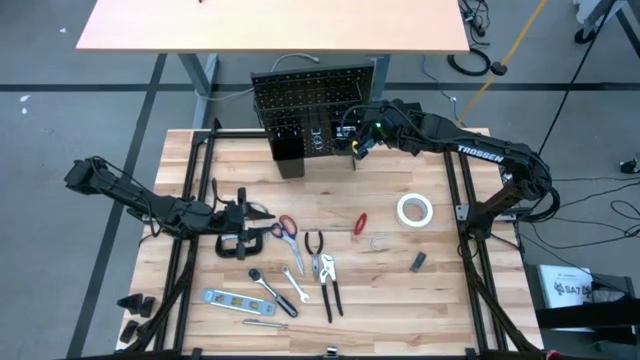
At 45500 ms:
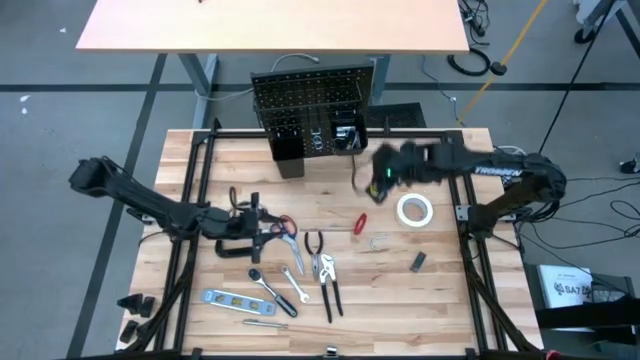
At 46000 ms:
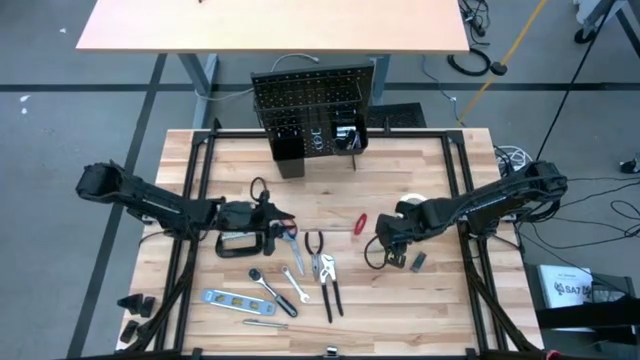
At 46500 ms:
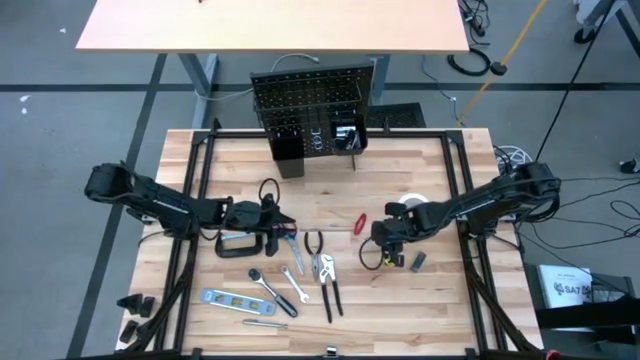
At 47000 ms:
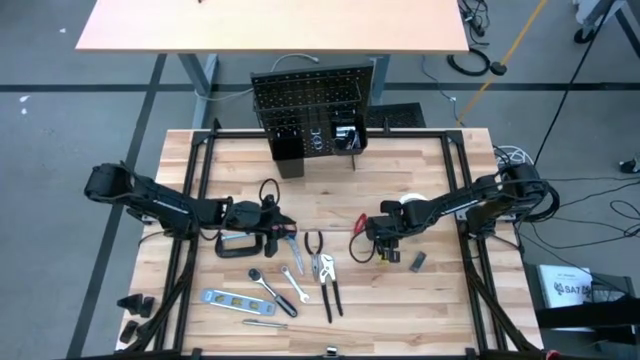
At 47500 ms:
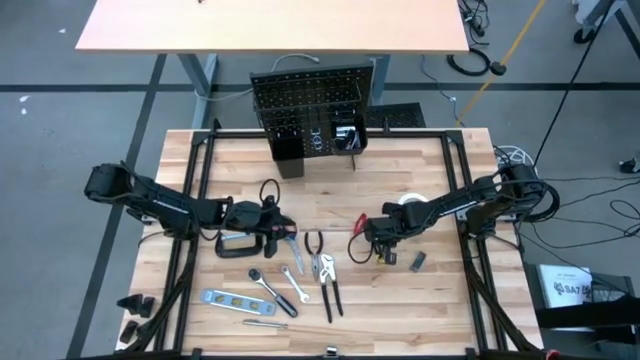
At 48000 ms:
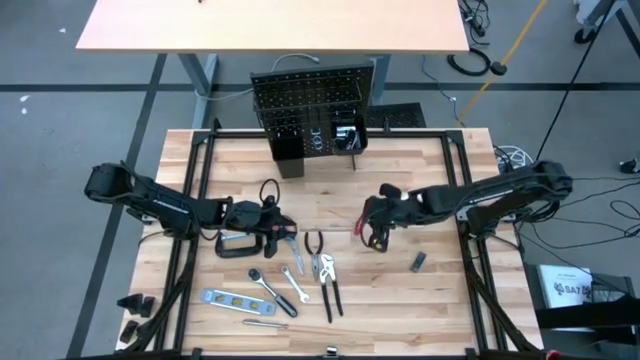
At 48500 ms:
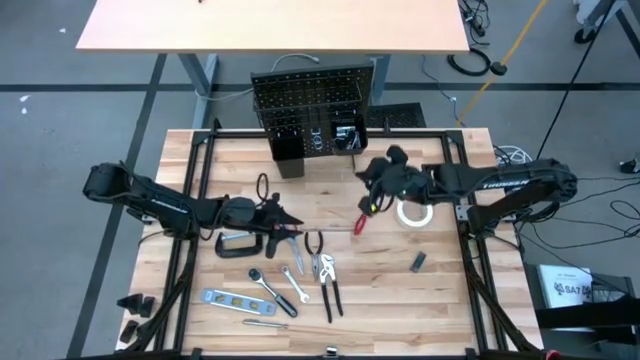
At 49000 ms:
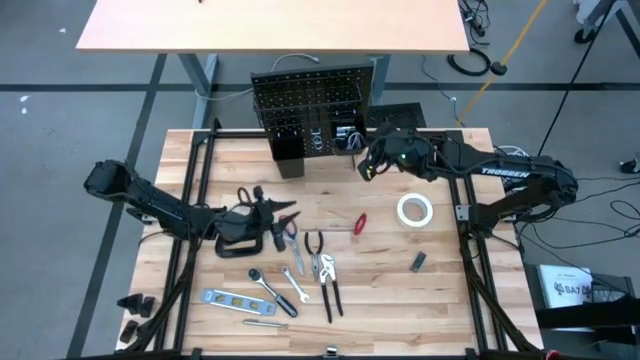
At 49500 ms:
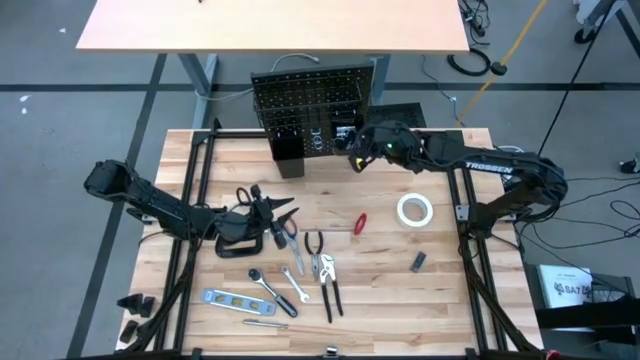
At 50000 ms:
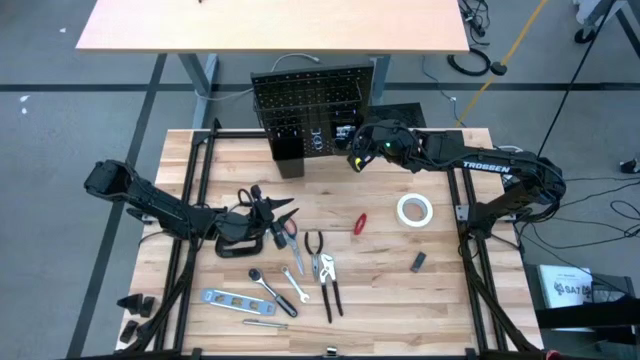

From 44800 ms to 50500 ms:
Task: Hang tools onto peg board
Put the hanger hook on the right black bin on the peg board

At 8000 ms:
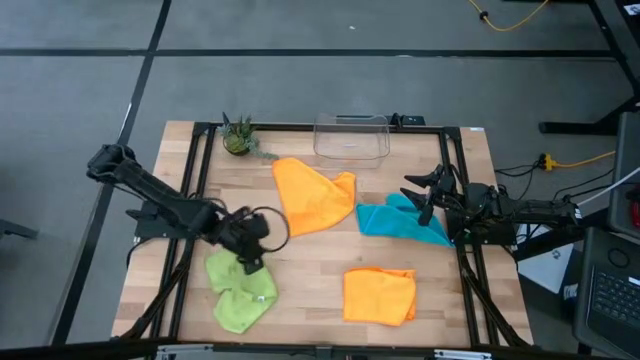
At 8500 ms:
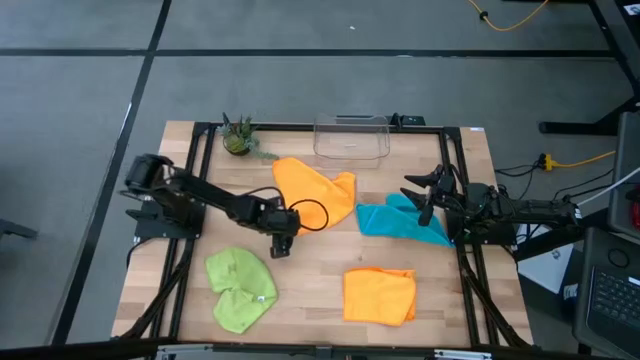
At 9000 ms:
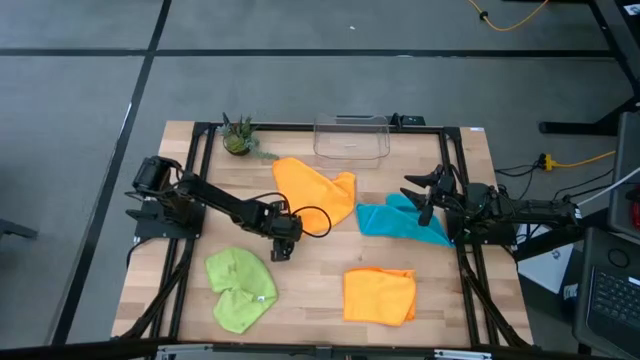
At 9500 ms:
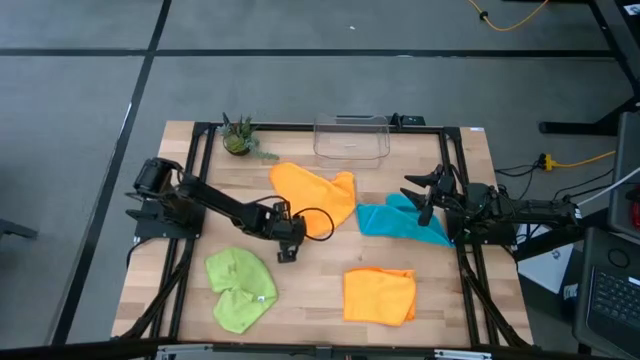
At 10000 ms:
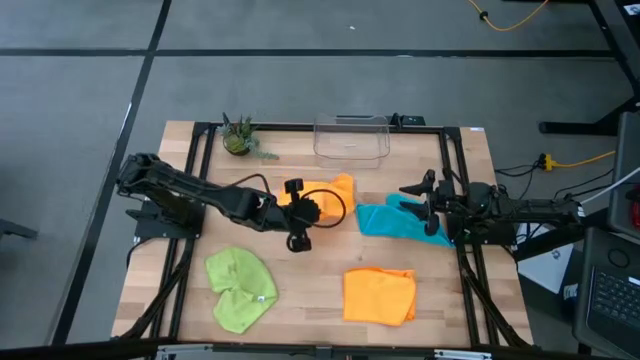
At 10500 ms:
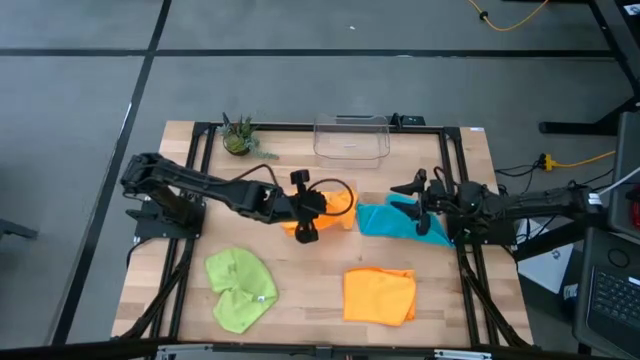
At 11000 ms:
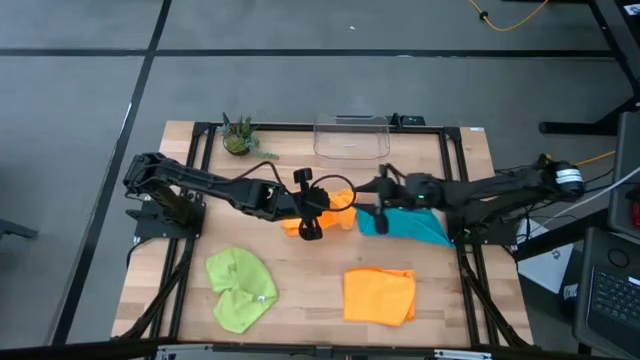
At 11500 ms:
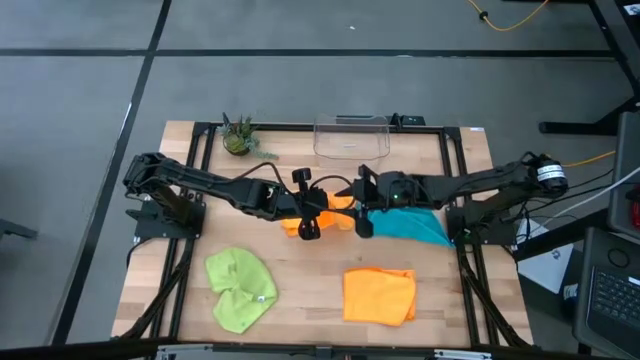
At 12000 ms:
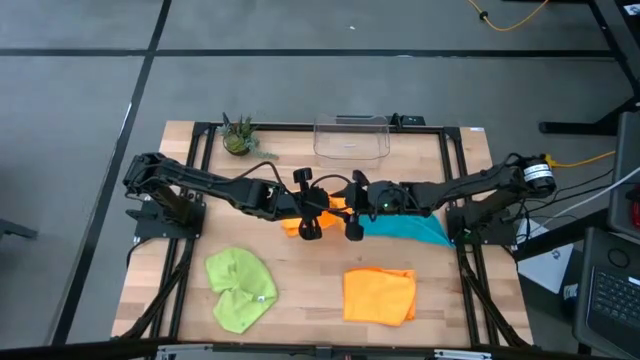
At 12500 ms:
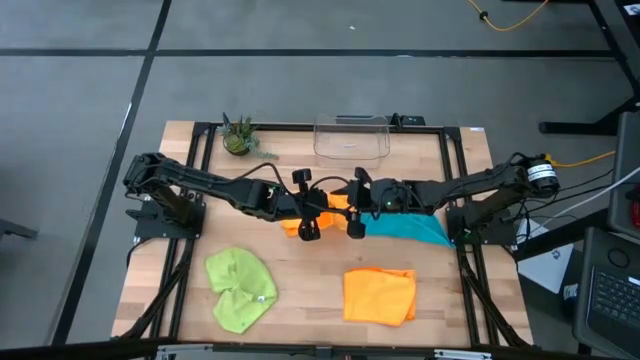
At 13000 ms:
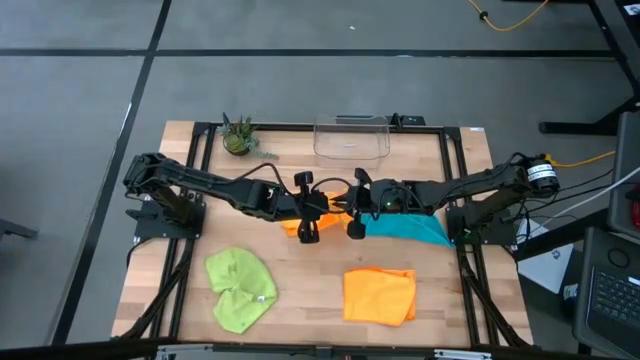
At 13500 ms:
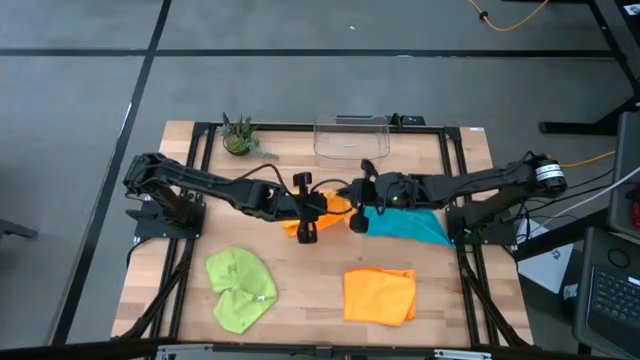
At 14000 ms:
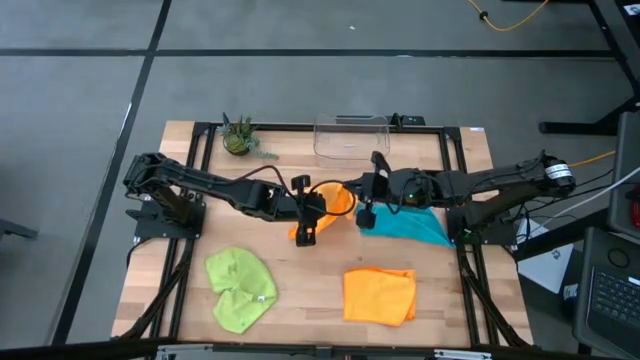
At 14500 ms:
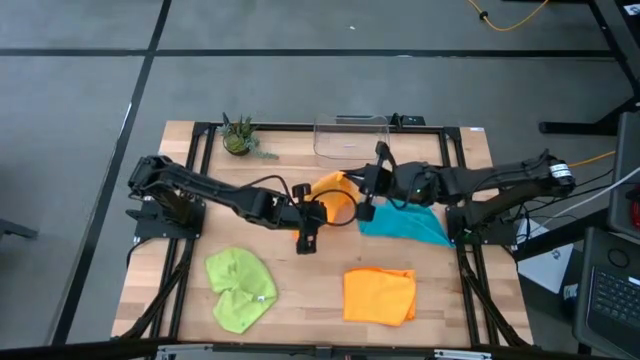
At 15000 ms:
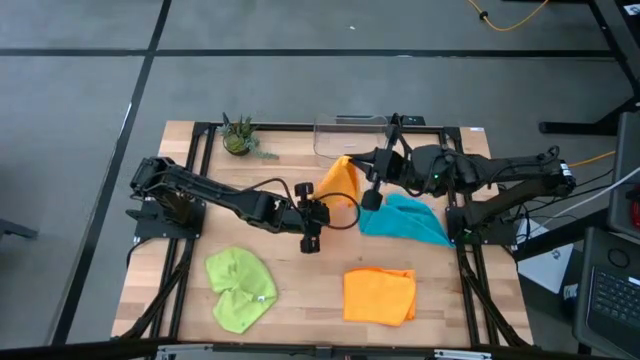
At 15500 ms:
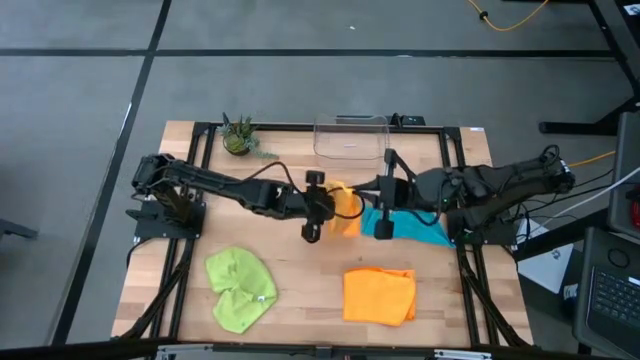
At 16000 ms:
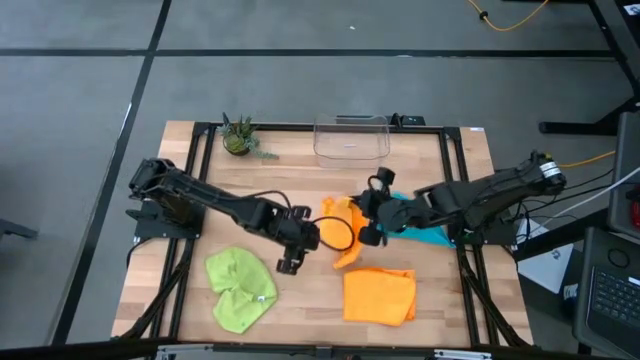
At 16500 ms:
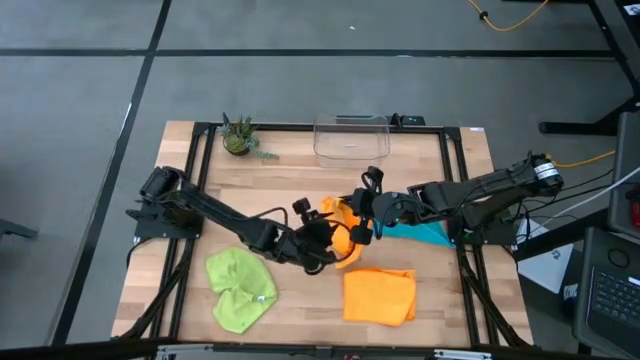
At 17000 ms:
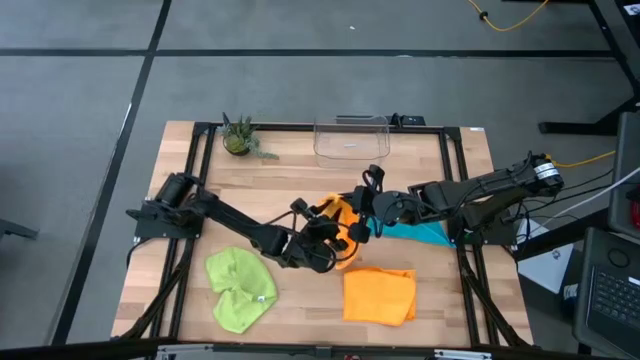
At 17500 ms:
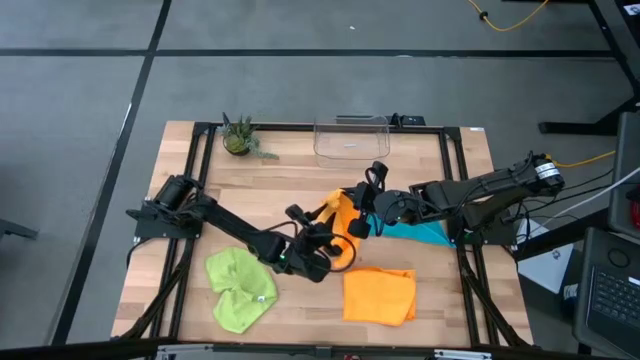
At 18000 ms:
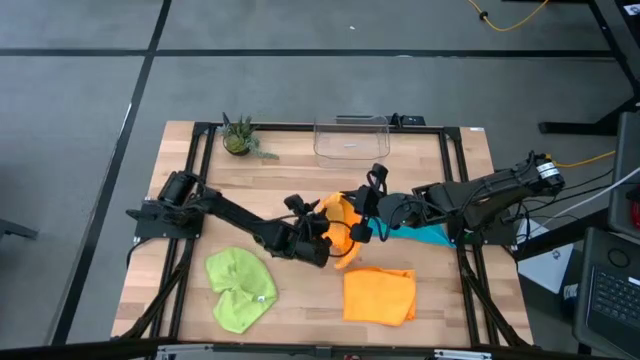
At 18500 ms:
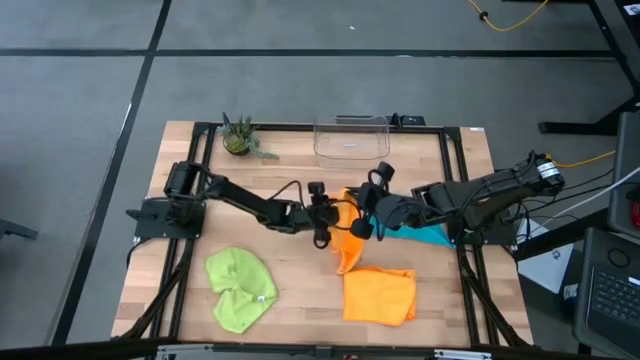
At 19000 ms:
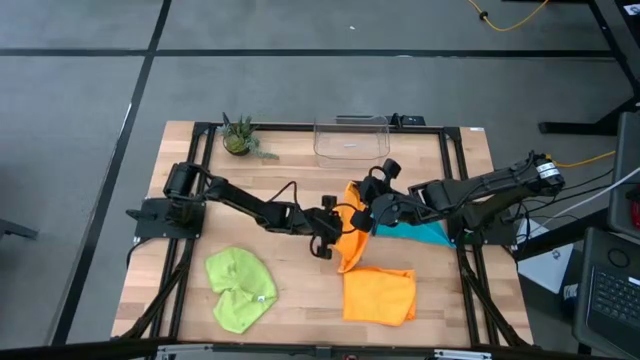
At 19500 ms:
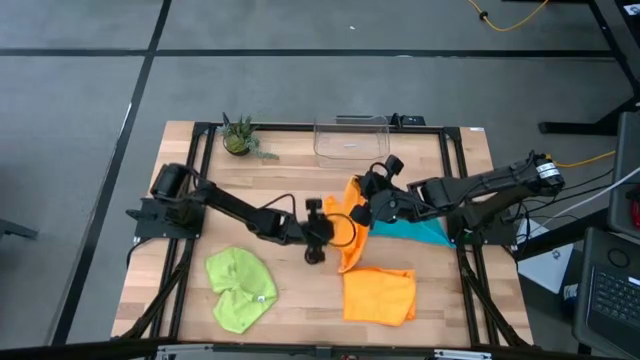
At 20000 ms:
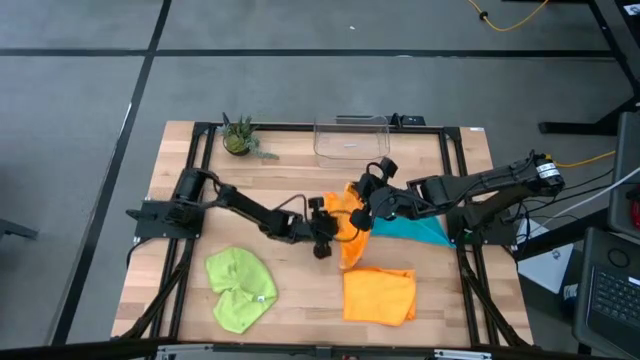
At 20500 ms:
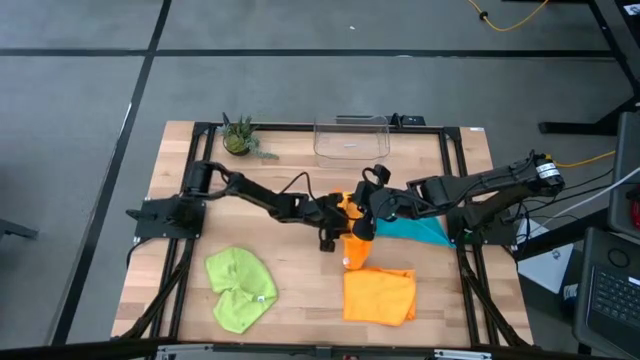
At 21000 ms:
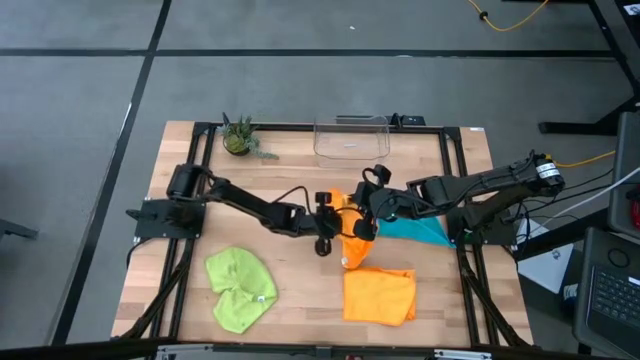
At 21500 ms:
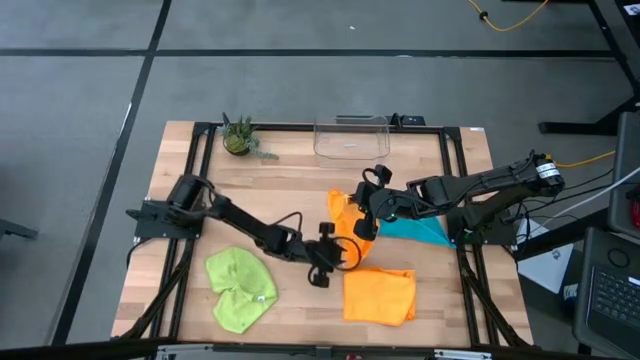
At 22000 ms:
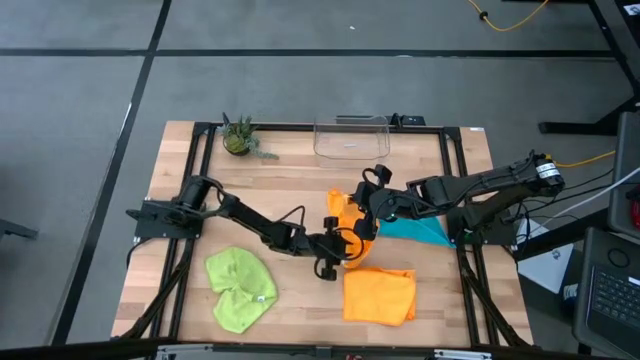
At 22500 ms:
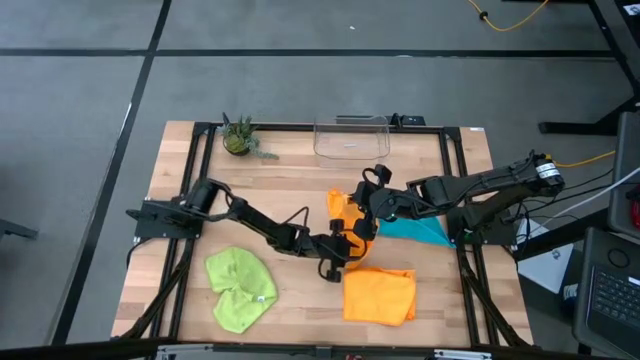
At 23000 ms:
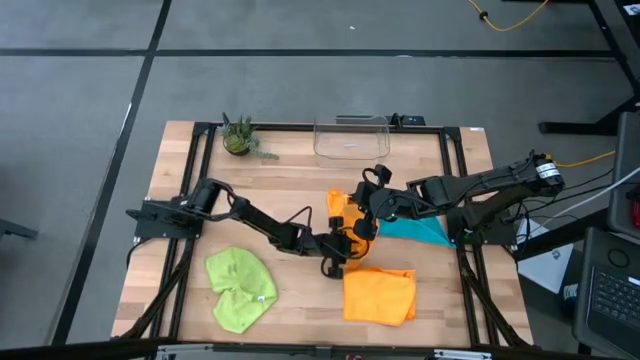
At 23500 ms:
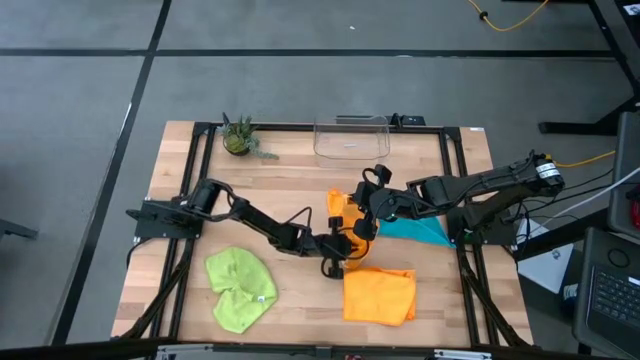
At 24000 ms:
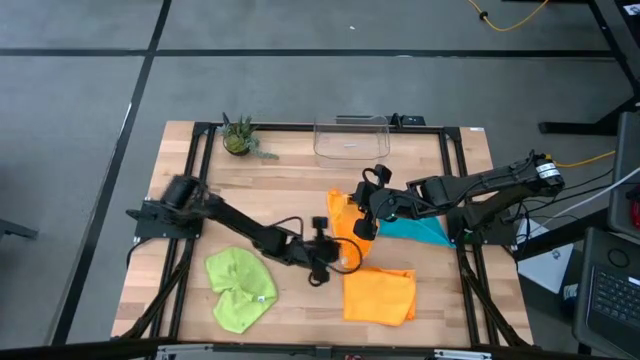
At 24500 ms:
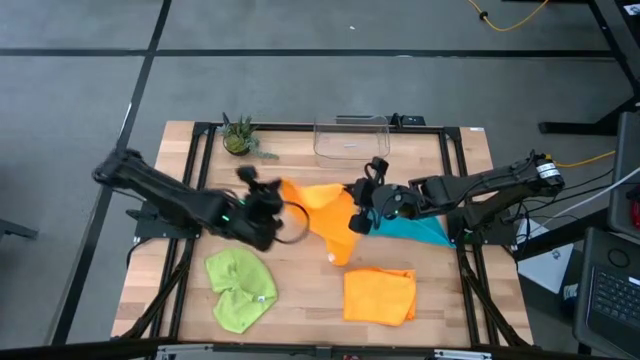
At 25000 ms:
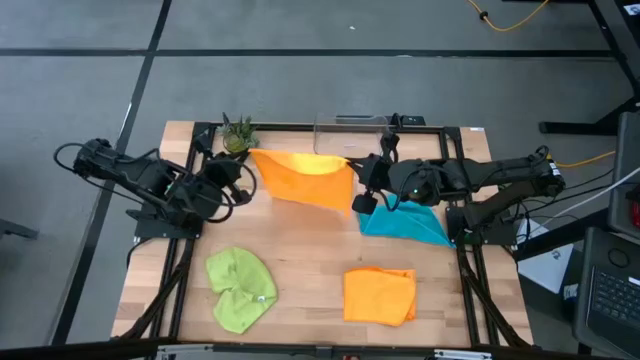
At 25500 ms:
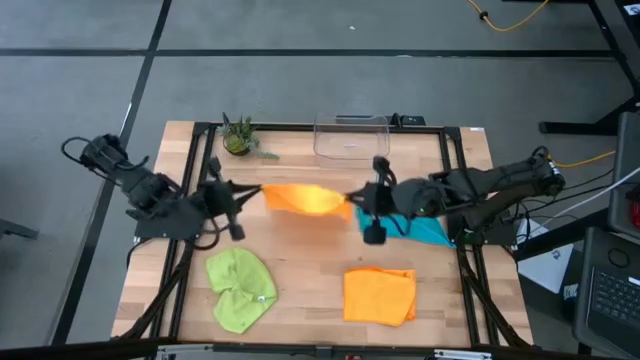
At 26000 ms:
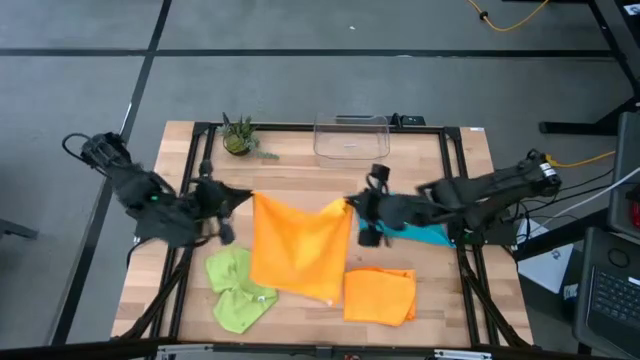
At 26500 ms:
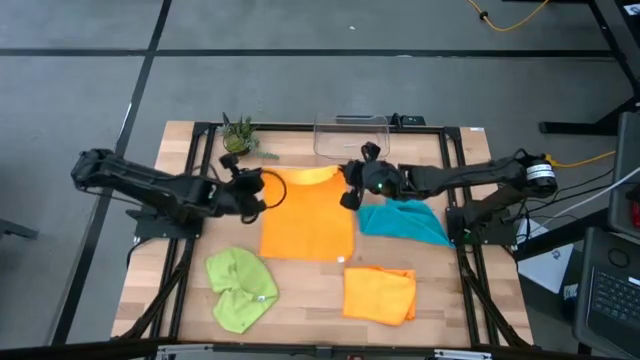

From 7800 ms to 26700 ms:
Task: Fold microfiber towels
Fold the top orange towel on the table
